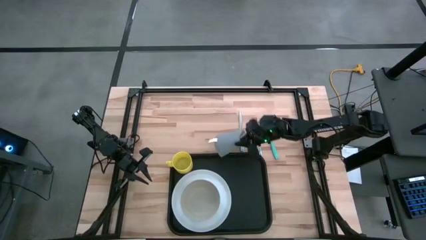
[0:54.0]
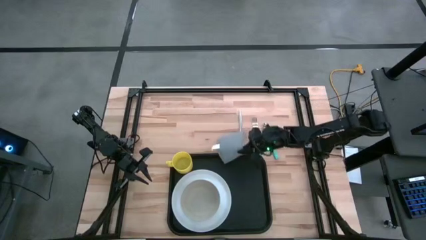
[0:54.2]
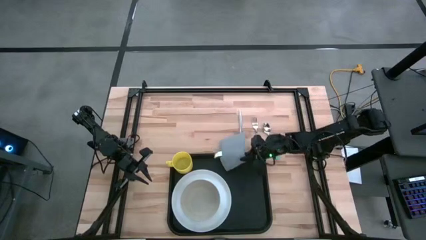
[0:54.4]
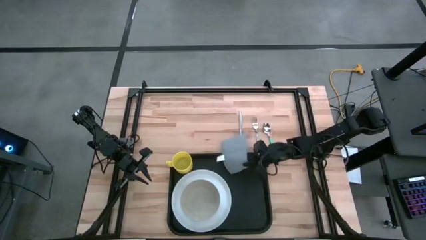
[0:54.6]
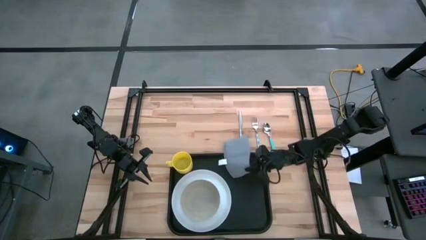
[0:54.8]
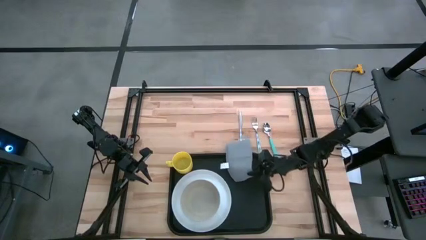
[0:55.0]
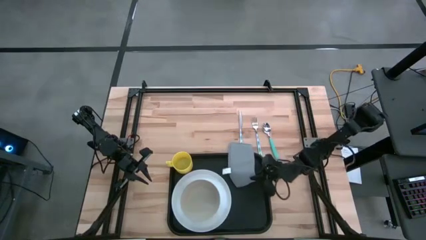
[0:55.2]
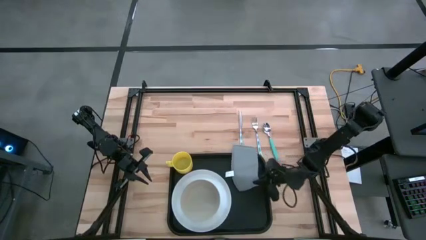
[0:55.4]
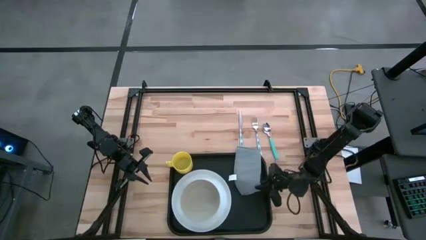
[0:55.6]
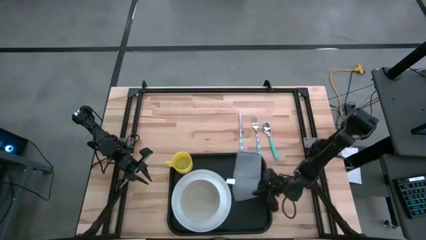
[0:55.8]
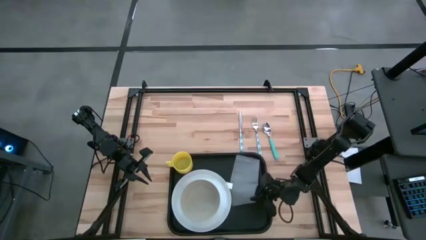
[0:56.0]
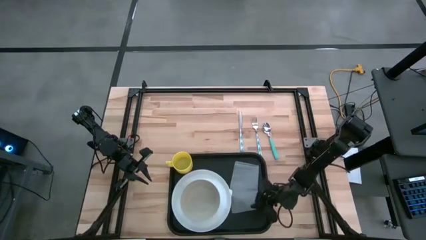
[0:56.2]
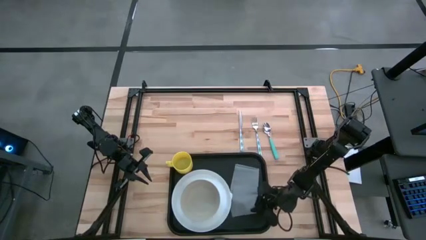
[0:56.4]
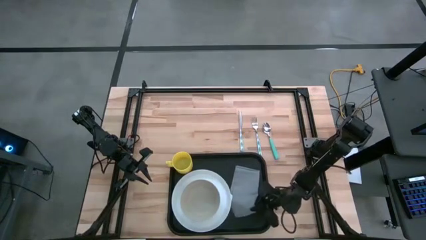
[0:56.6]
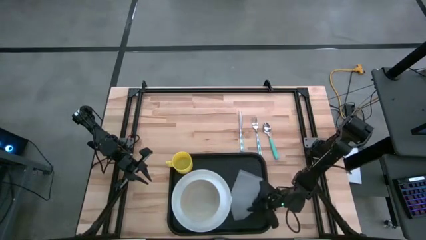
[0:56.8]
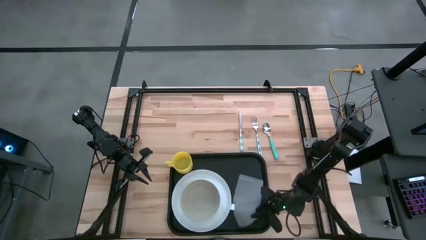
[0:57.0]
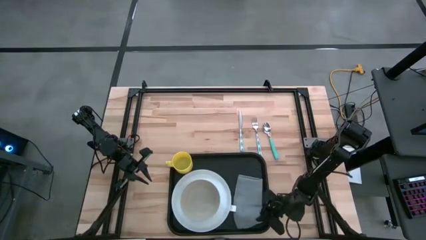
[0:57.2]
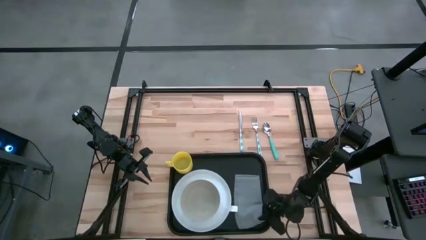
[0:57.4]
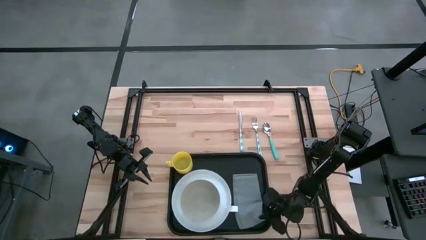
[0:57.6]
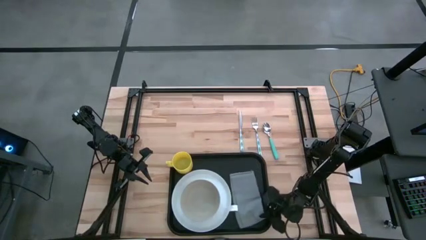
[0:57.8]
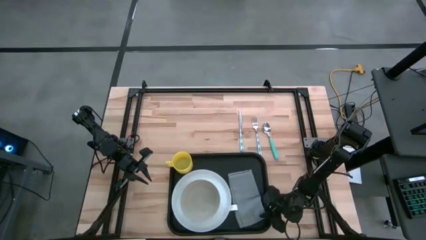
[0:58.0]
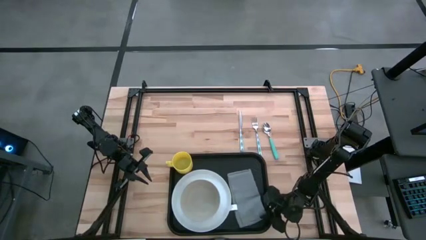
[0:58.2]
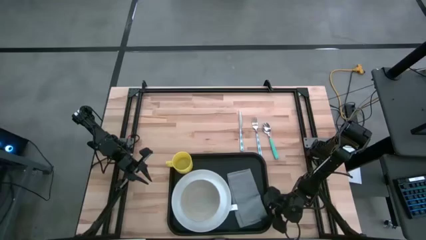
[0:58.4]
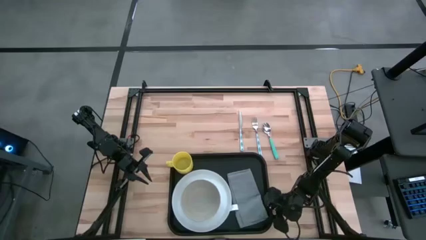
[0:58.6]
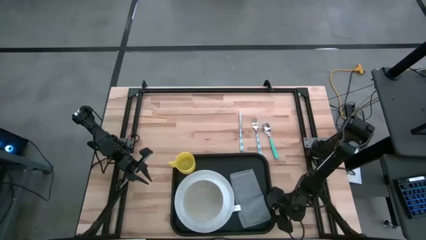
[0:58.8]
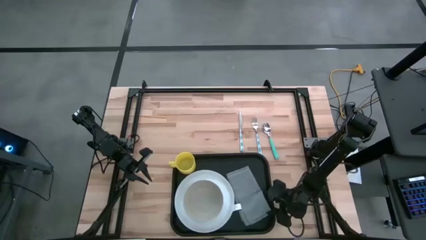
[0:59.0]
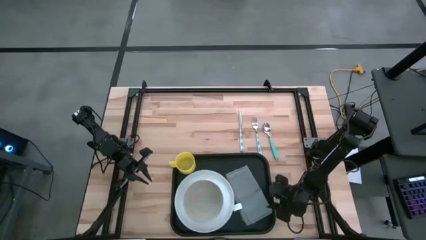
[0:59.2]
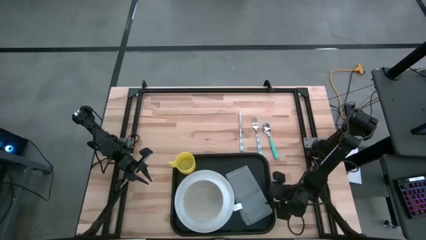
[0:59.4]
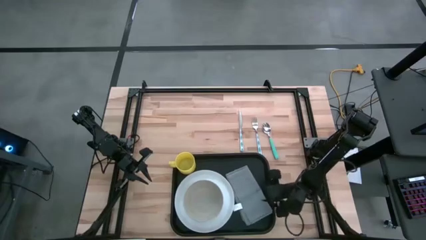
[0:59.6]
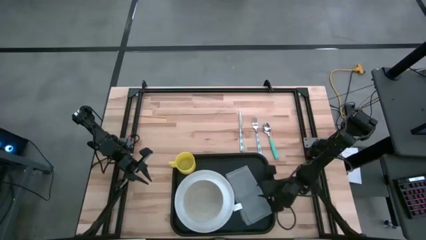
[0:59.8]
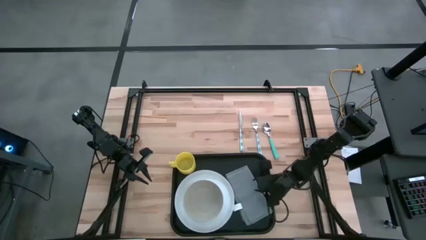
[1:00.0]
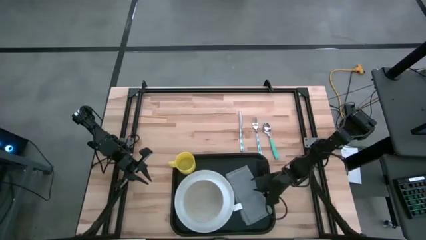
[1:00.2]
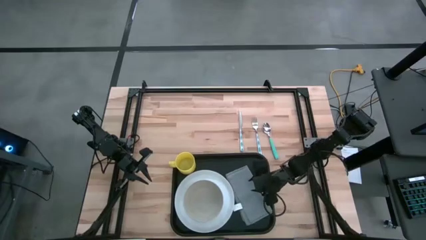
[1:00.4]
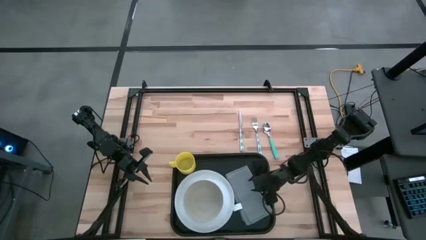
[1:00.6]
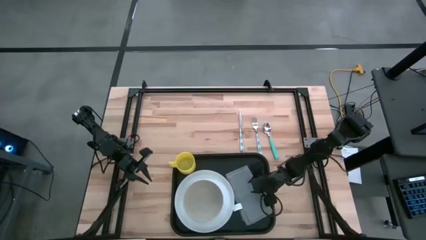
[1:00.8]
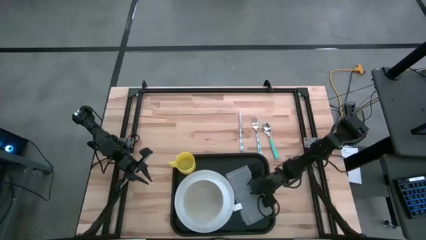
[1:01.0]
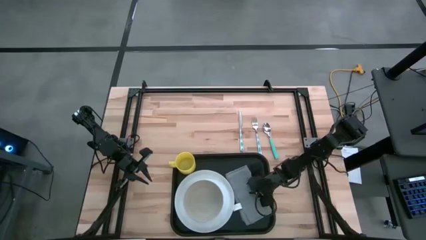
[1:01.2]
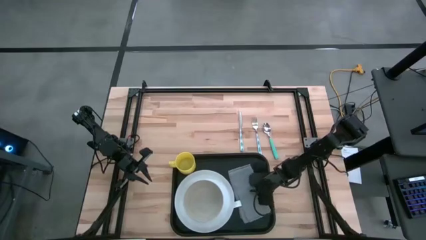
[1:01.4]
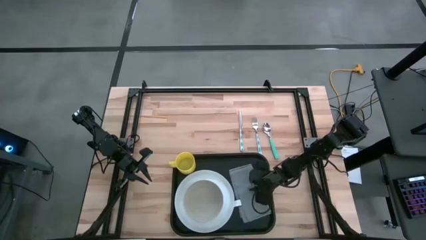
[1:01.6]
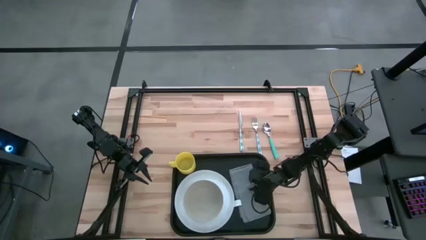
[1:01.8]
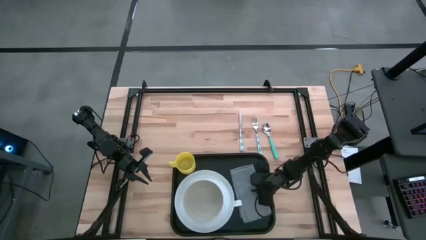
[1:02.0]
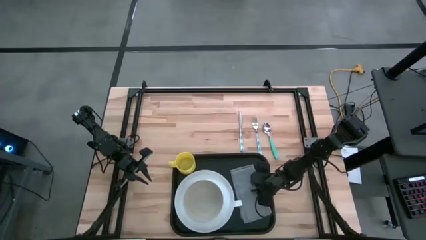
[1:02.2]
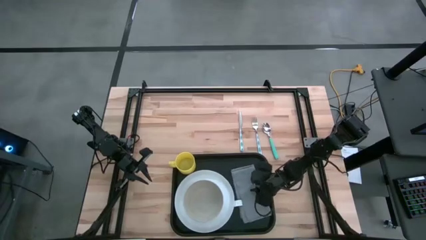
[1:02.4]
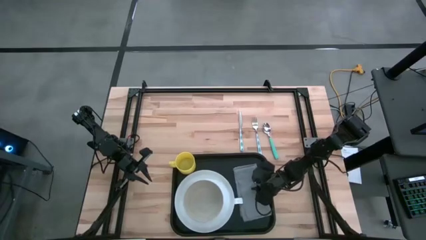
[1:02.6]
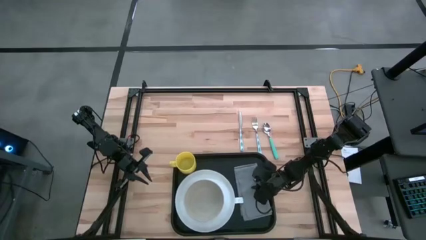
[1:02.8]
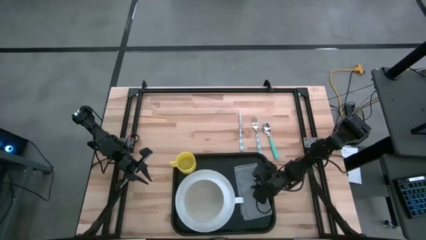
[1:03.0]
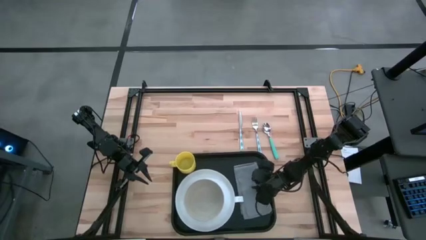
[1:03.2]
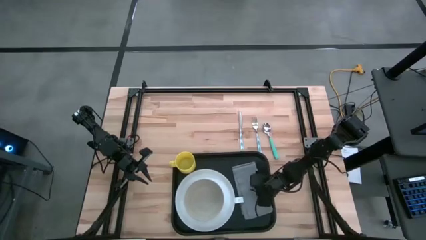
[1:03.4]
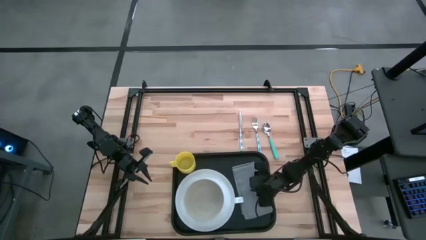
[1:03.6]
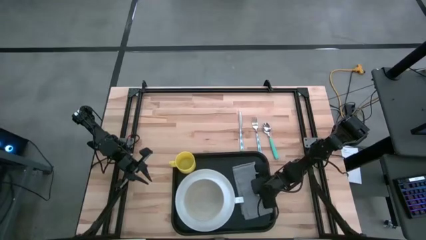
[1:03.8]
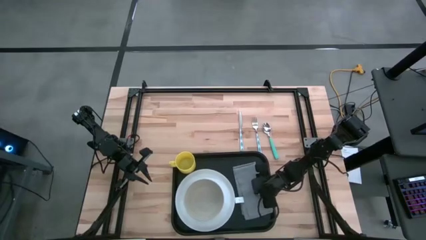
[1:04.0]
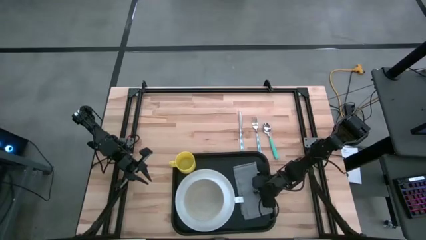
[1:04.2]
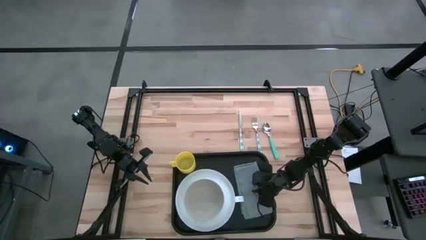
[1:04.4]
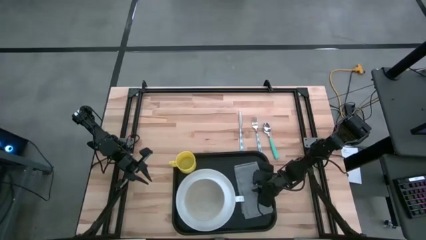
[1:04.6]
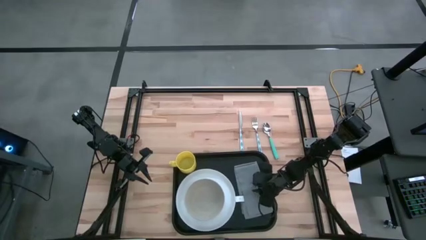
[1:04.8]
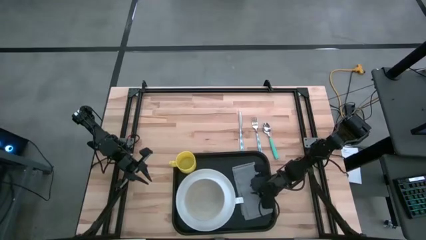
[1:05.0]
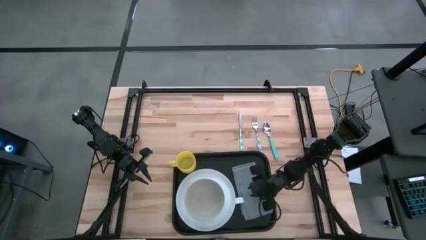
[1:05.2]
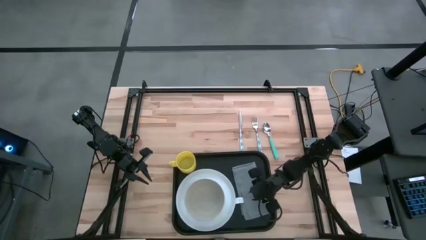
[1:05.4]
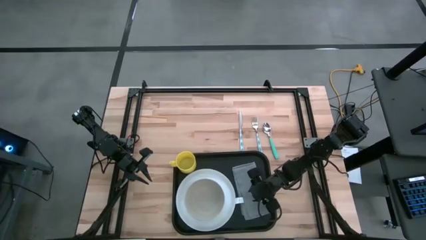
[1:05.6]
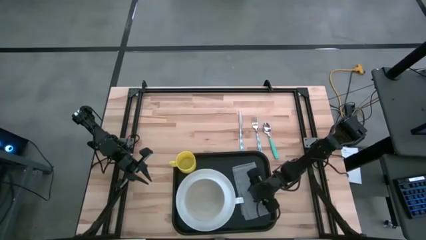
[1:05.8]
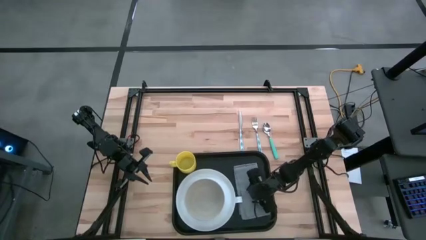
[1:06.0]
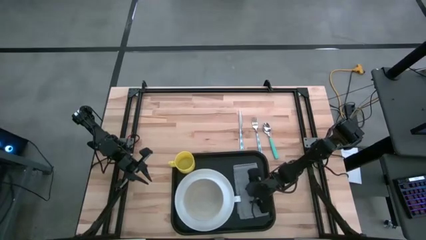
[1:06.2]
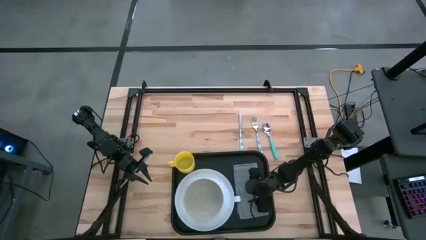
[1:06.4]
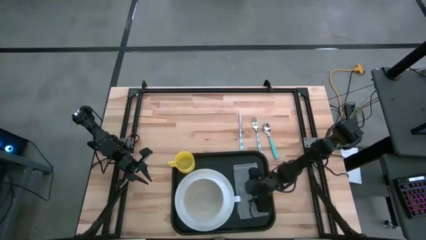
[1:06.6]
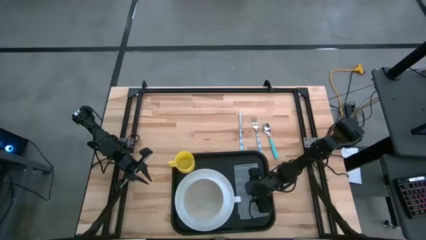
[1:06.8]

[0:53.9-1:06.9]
Task: Set up tray
Put the gray napkin on the black serving tray to the right of the white plate

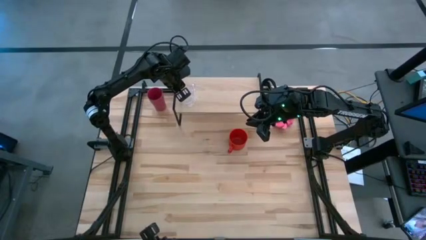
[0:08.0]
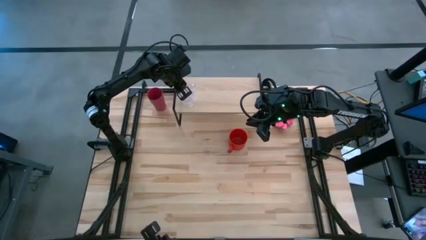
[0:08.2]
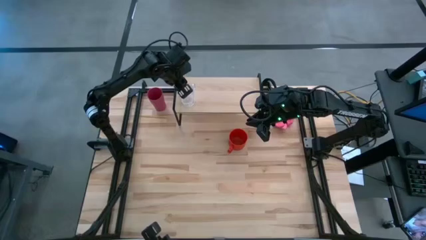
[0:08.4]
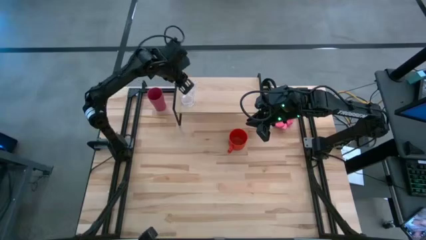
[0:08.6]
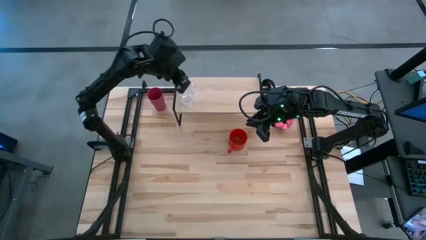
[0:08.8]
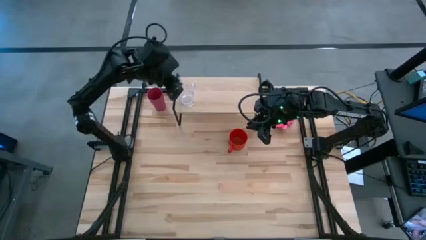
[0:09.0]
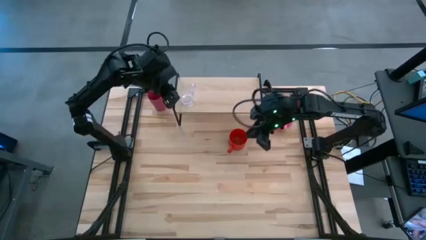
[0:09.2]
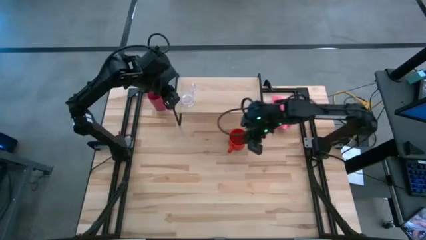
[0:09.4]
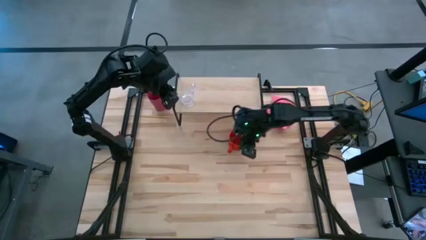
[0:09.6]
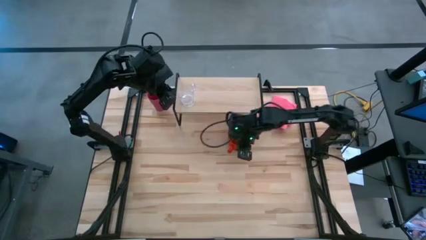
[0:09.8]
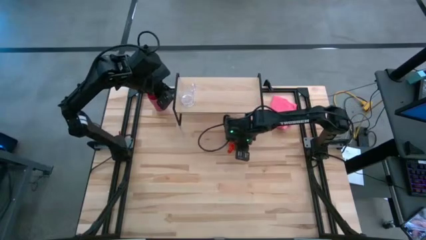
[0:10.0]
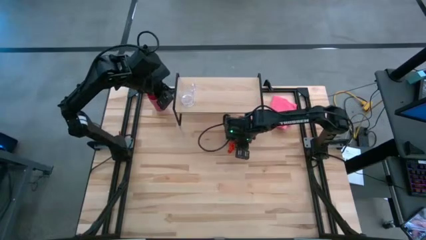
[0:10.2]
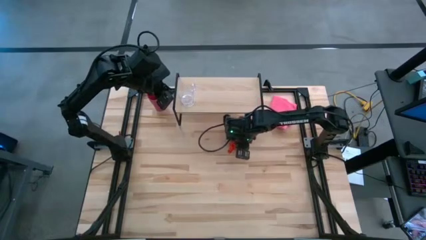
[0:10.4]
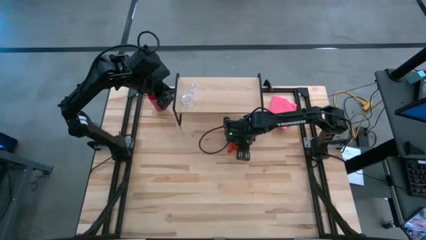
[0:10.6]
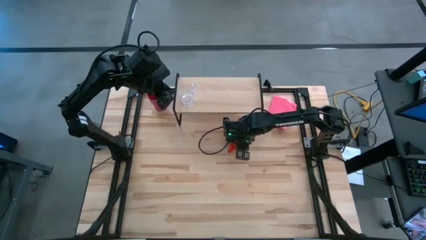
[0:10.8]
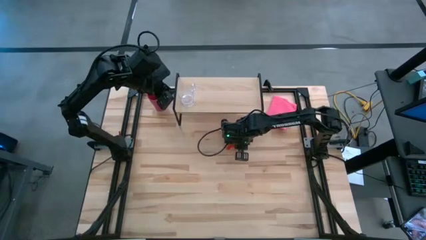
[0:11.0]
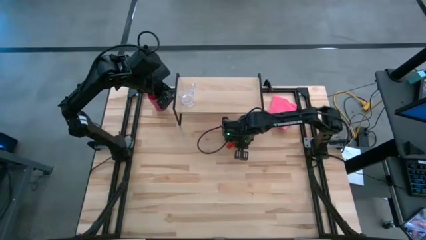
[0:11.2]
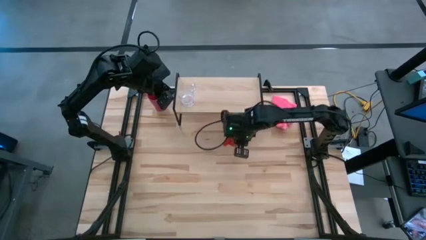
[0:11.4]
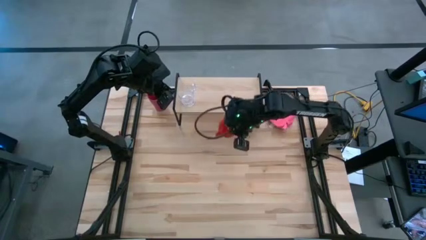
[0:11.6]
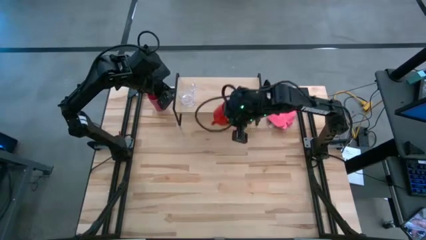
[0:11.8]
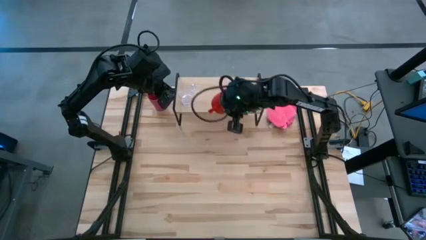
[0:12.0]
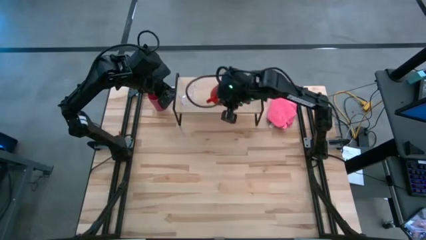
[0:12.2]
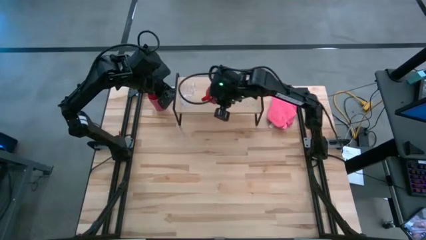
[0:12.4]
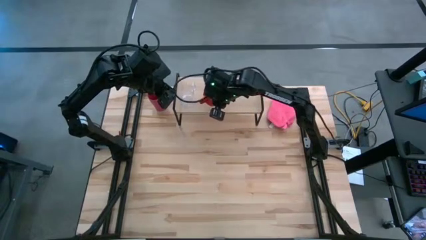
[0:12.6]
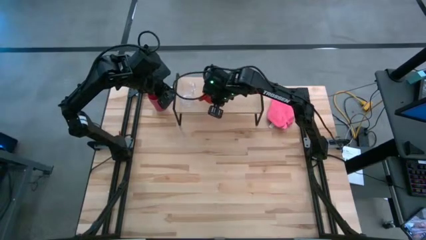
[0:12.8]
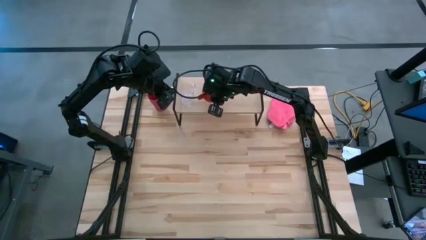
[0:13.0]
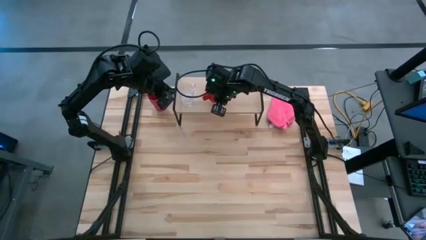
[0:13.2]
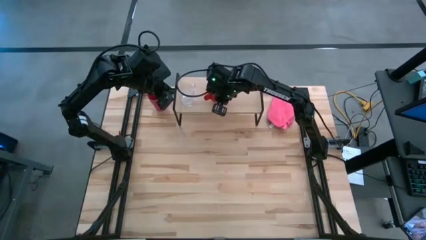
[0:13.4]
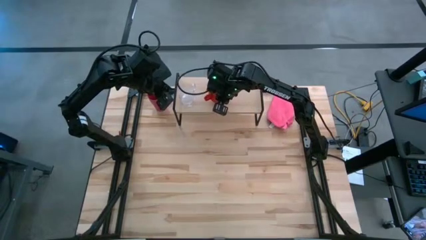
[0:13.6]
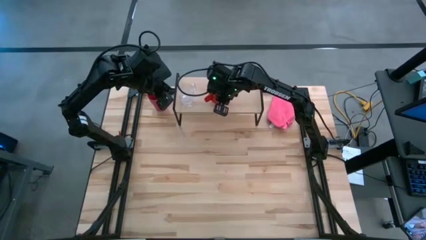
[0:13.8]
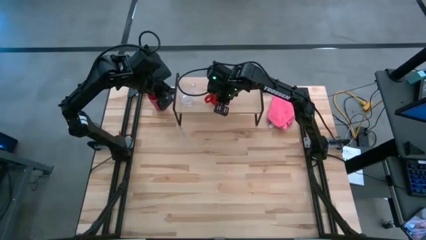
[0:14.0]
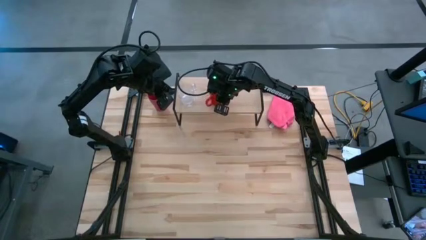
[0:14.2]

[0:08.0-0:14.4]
Task: Stack small to large cups/mugs on shelf
Put the red mug on the shelf
